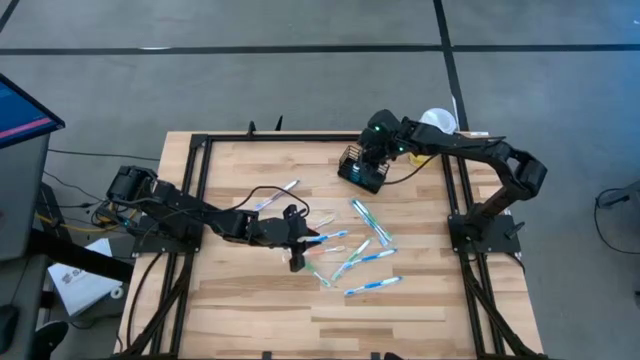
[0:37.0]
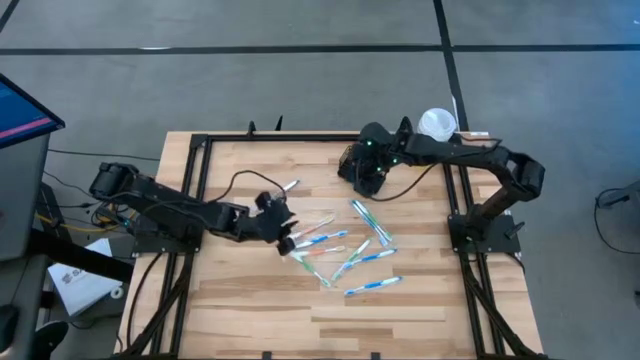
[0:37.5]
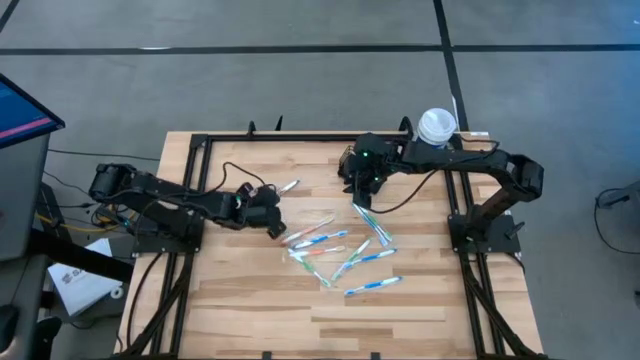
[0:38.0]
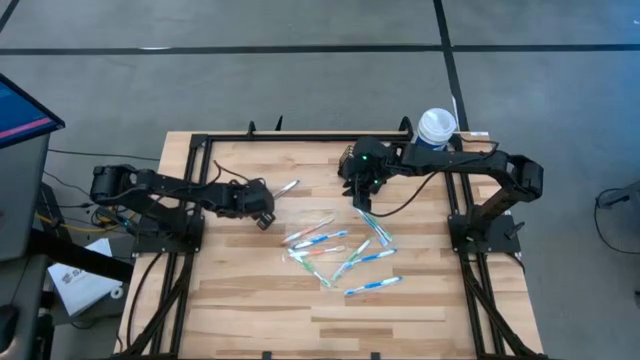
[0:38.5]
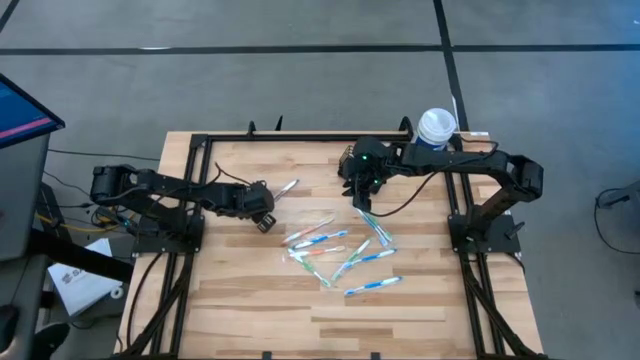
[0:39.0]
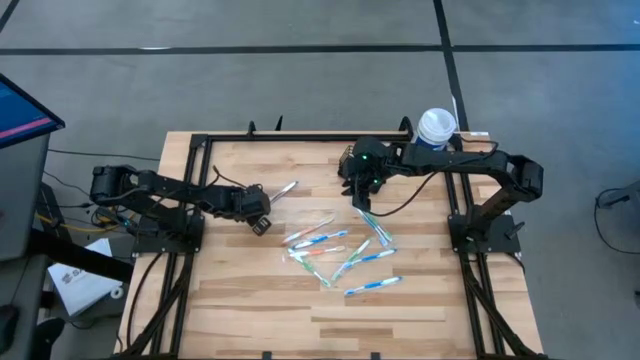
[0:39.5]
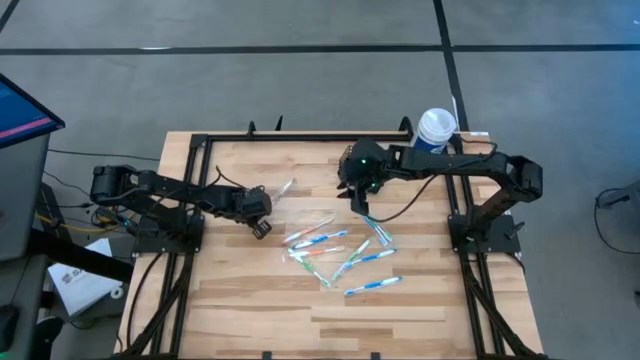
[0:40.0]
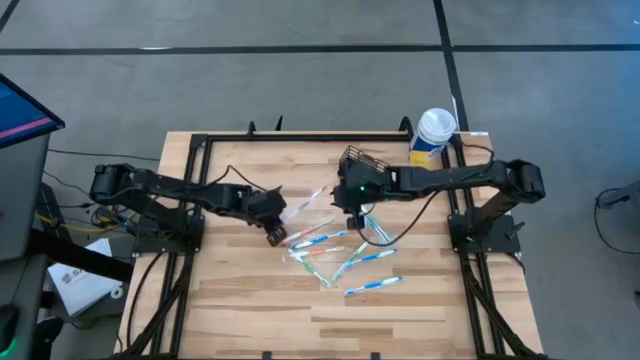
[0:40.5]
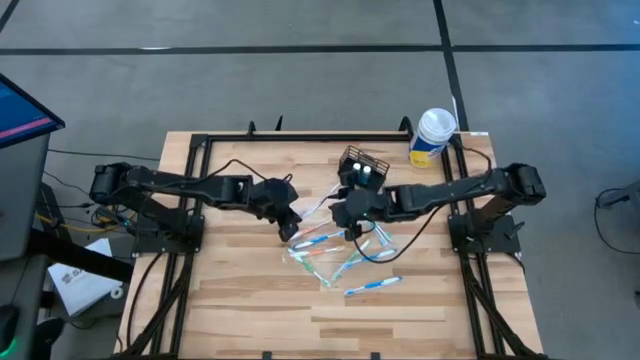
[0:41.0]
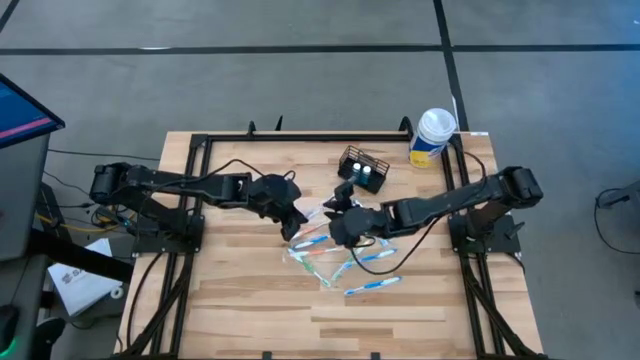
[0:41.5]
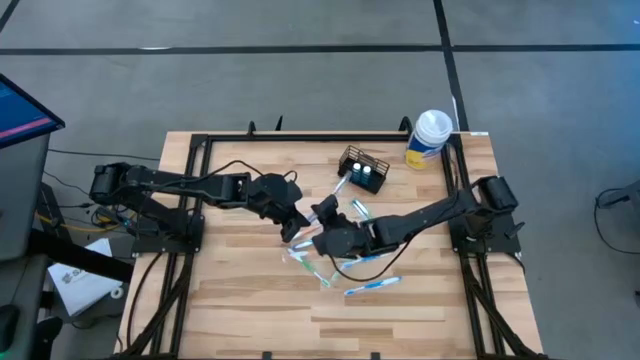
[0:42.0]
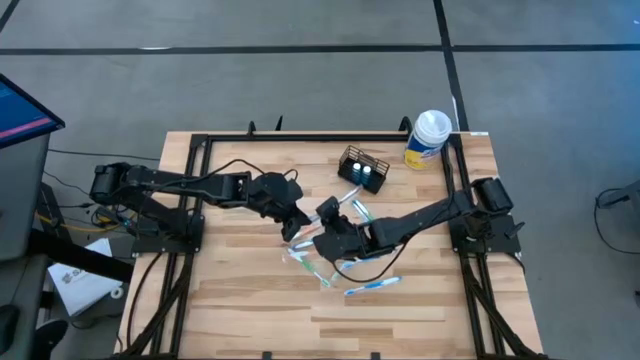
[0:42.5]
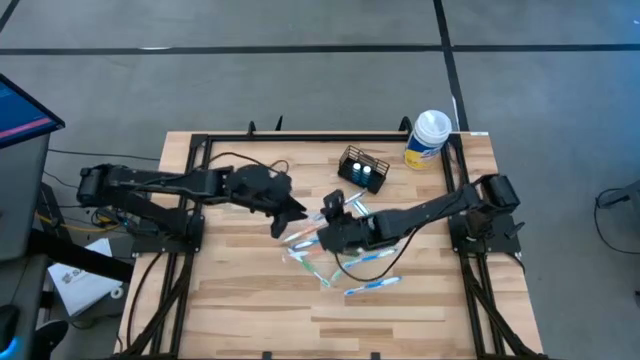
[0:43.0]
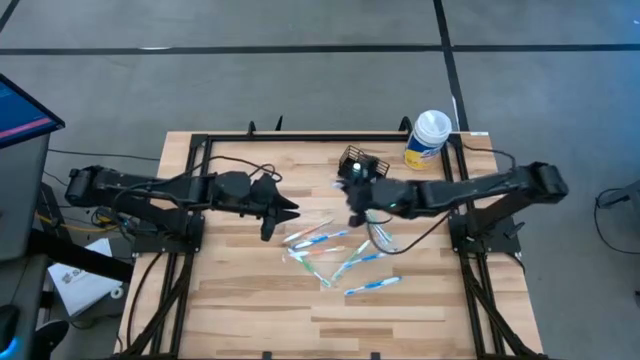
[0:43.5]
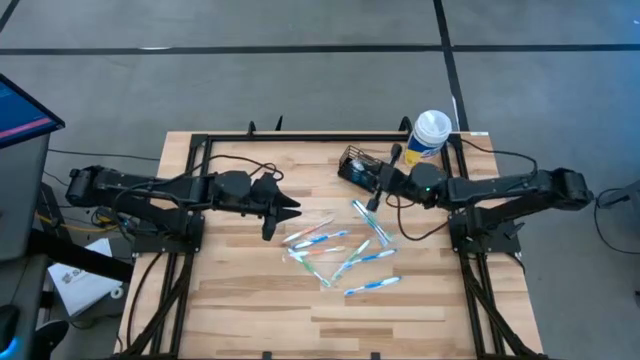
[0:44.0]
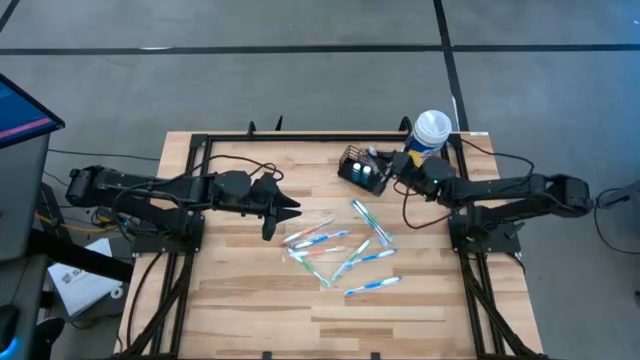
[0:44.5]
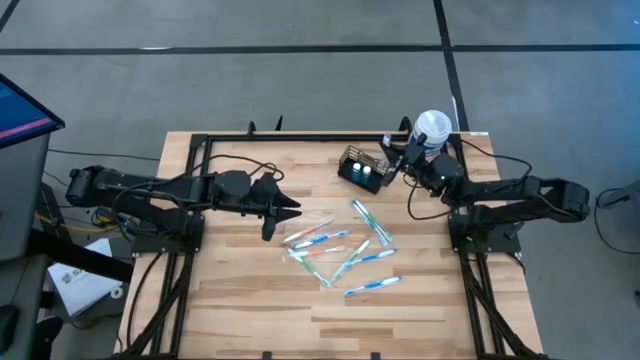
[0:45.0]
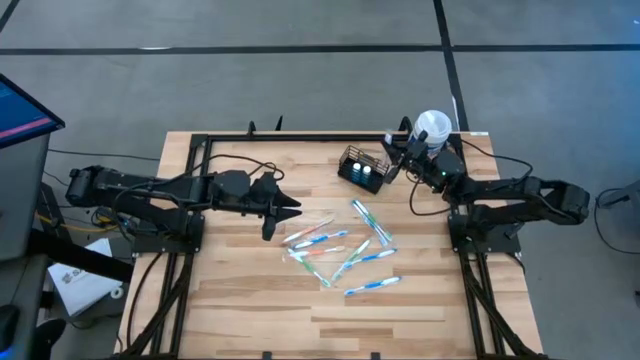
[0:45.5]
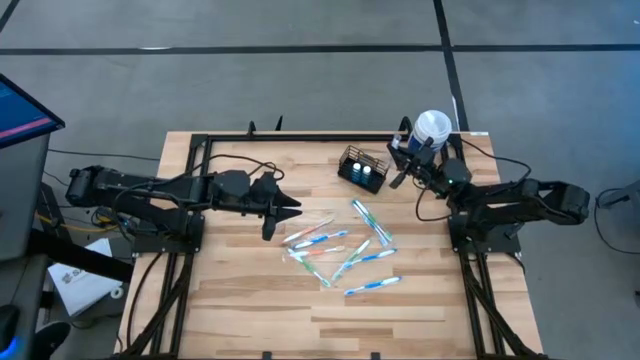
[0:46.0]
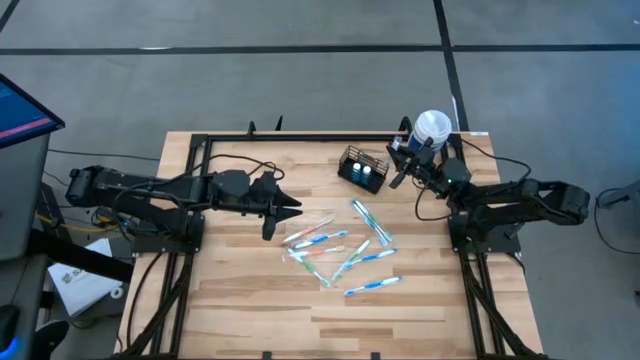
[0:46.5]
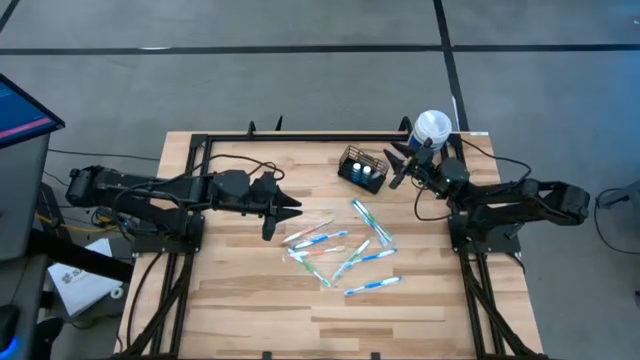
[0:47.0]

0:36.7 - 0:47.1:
Task: Pick & Place toothbrushing station
Put the purple toothbrush into the mesh organizer

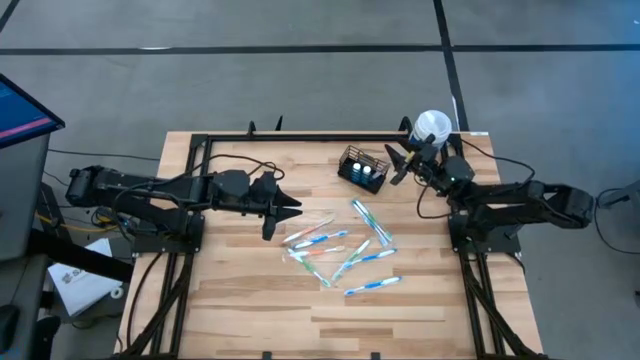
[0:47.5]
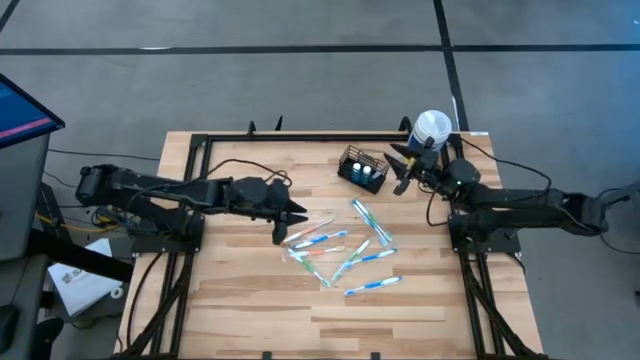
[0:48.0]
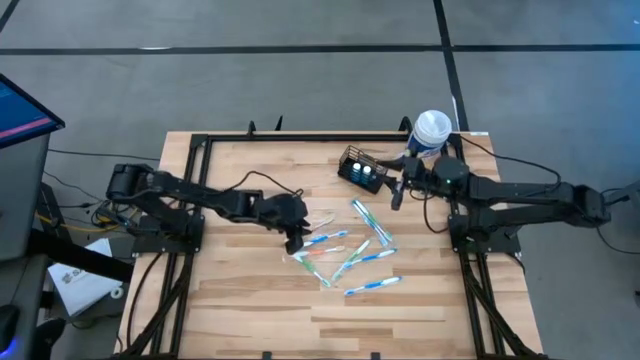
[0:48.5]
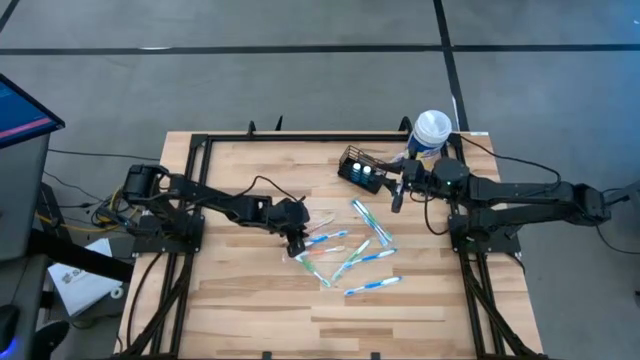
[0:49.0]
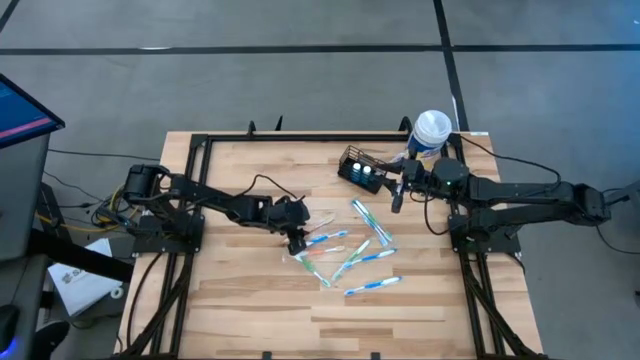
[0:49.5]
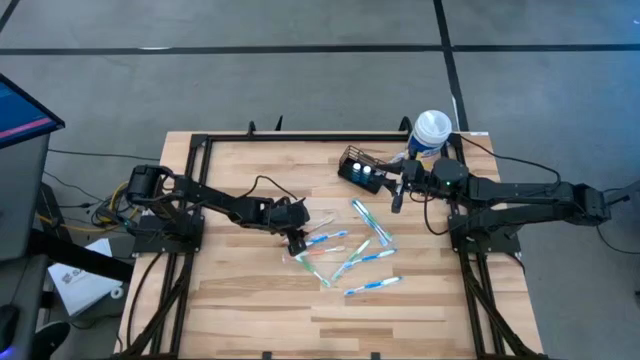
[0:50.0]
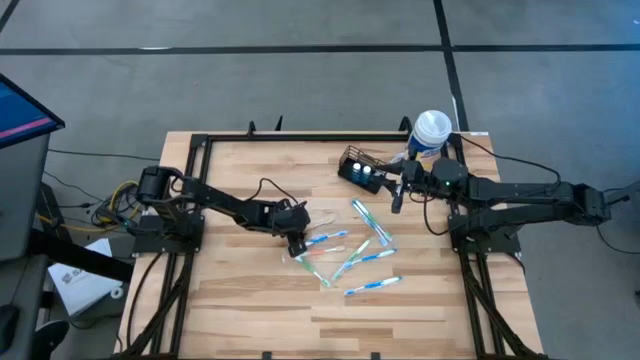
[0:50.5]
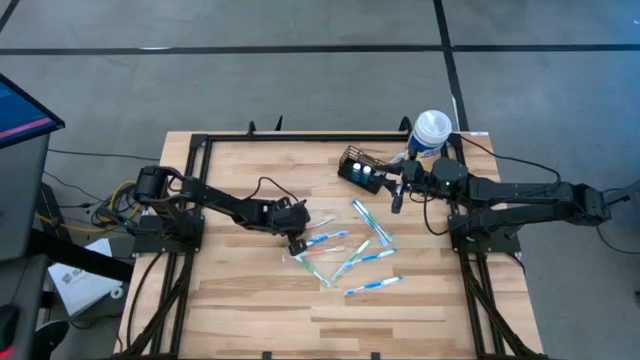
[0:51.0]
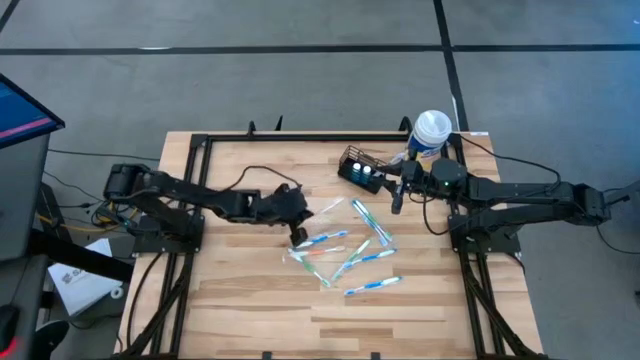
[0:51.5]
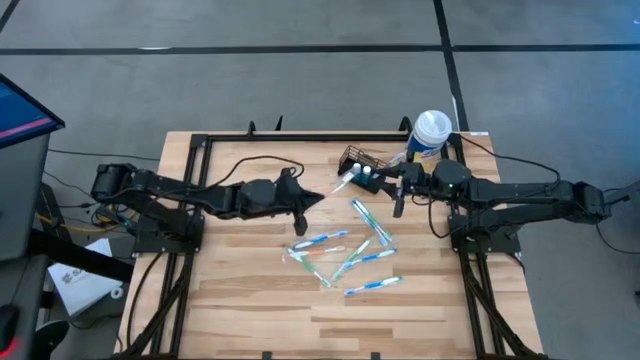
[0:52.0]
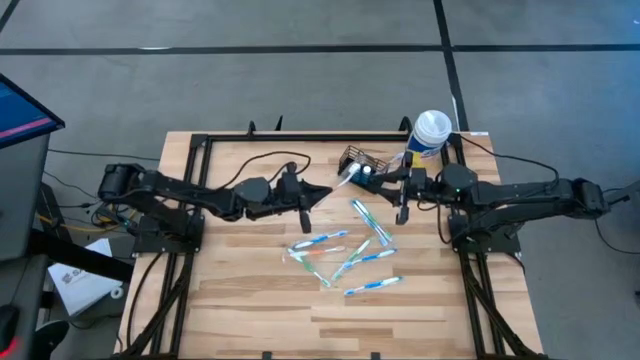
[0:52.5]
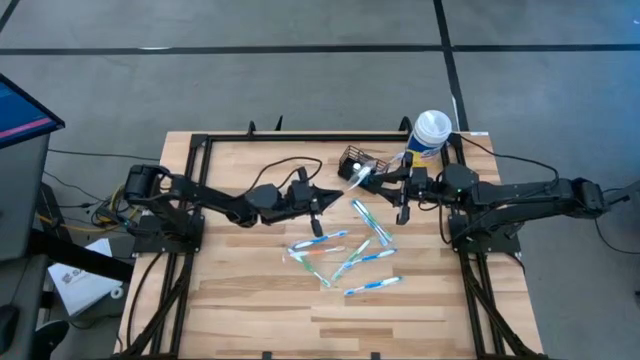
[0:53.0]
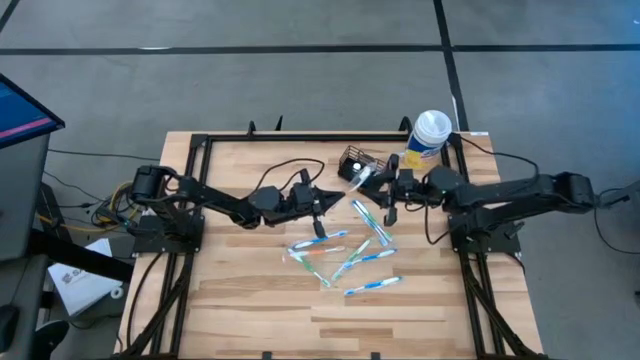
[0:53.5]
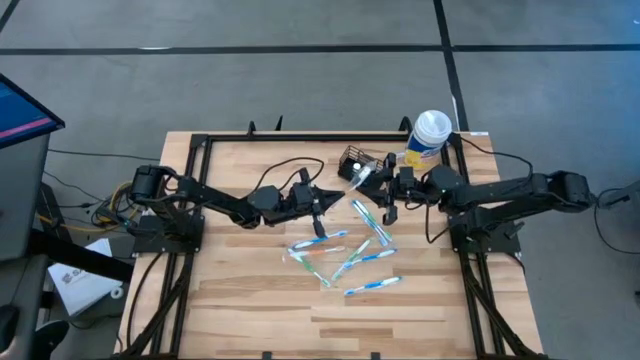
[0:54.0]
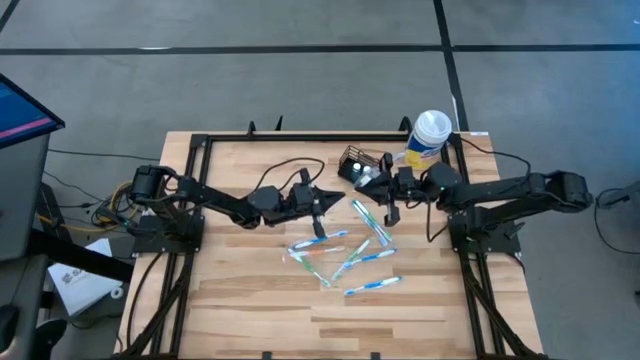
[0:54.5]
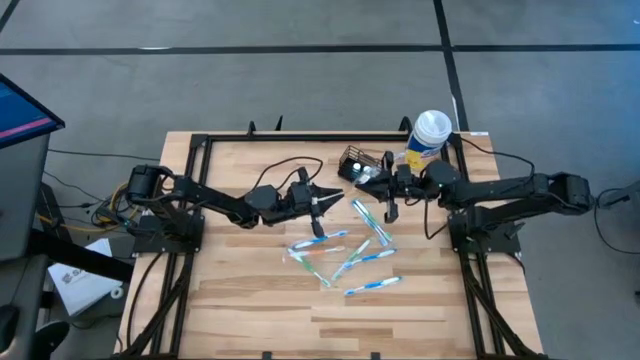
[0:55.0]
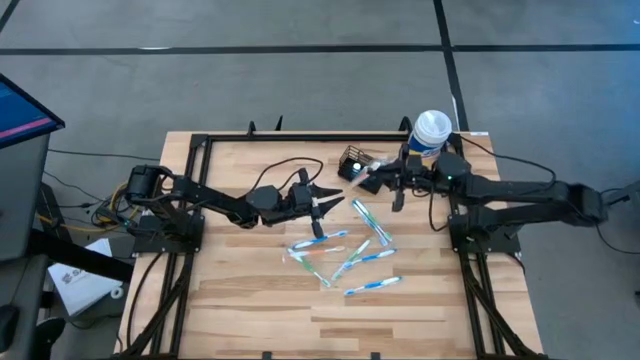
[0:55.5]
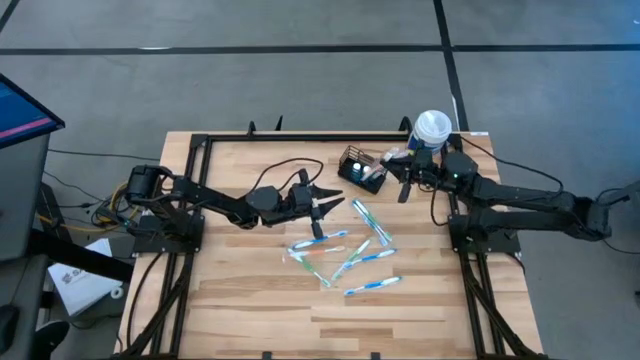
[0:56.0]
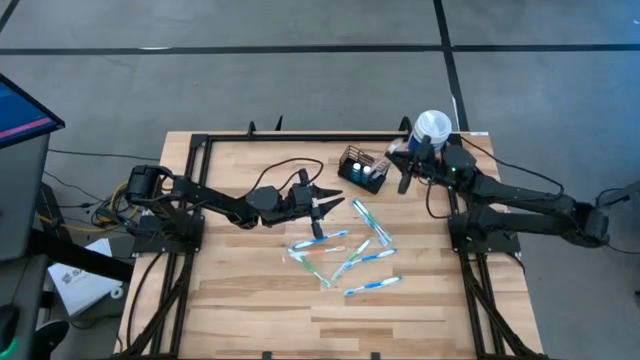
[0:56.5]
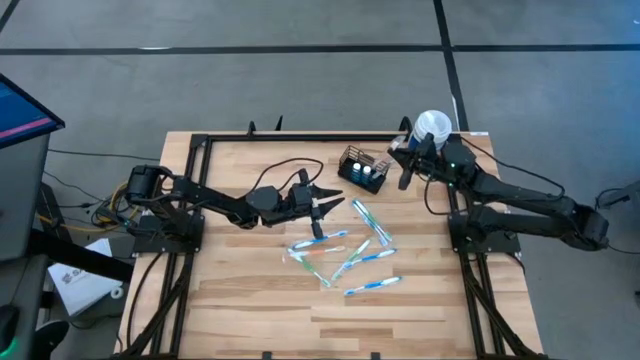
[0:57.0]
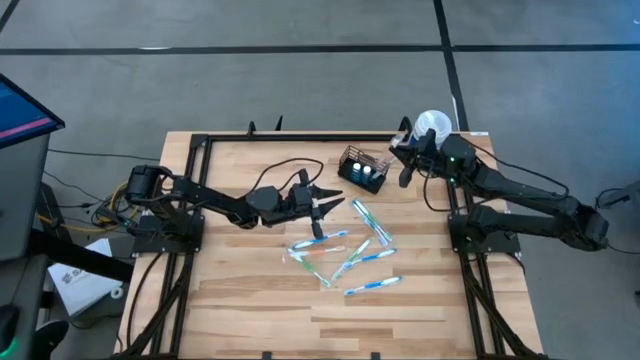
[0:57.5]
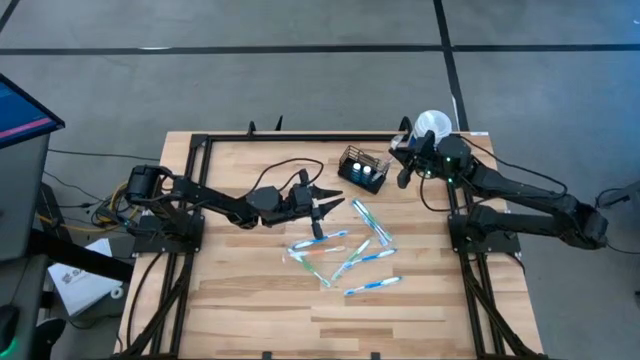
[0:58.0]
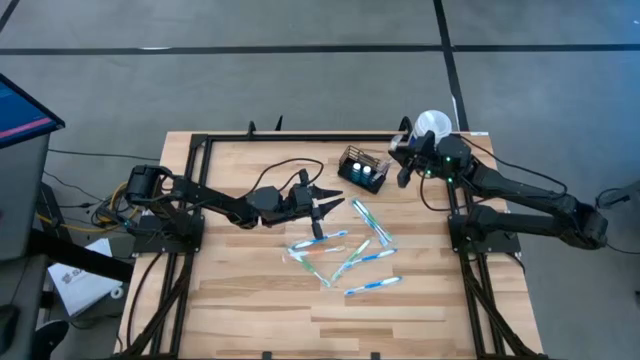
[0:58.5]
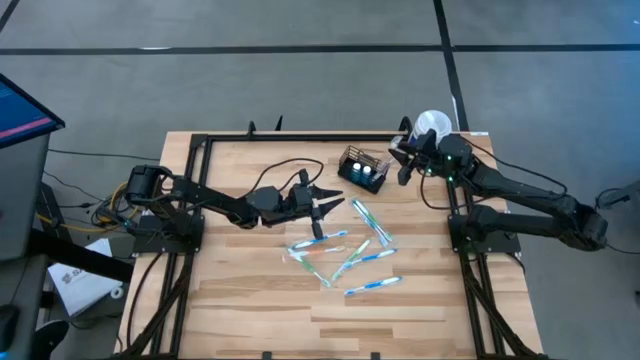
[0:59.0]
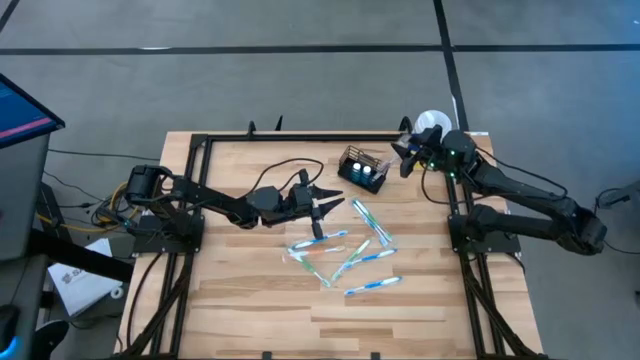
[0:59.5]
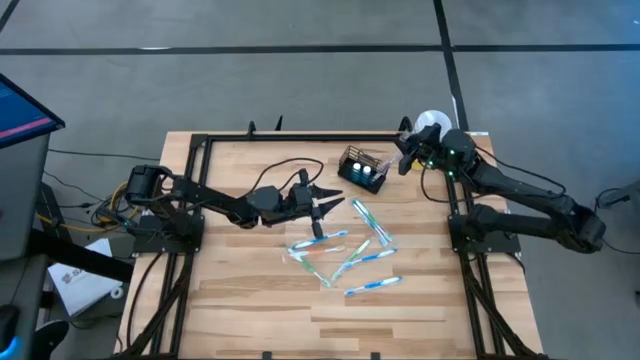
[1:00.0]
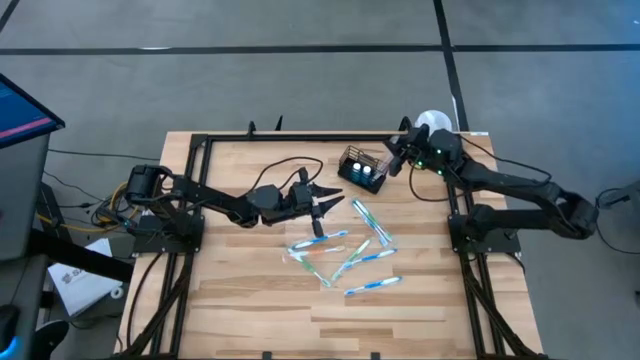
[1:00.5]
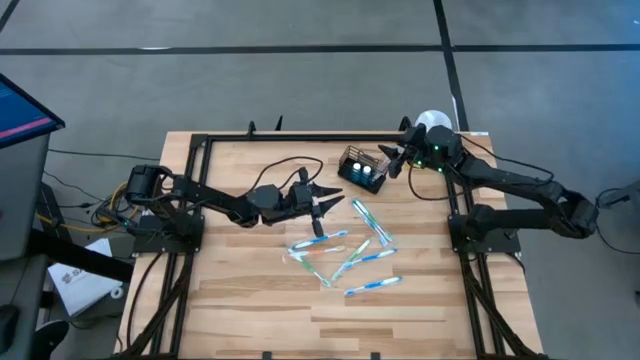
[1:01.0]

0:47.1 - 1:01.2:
Put the orange toothbrush into the mesh organizer
